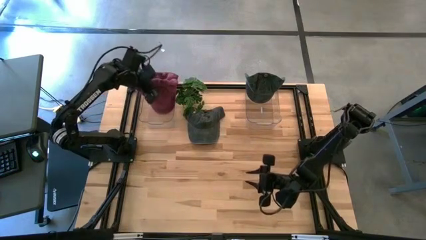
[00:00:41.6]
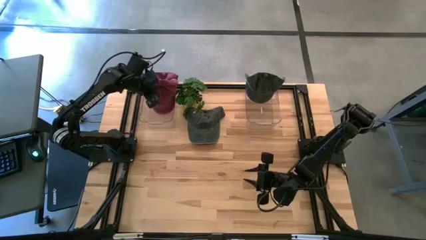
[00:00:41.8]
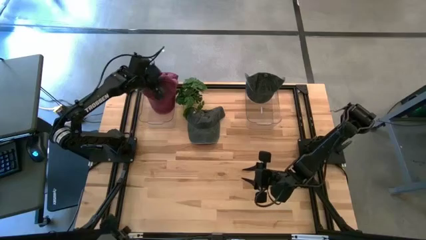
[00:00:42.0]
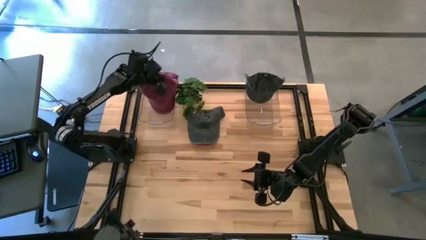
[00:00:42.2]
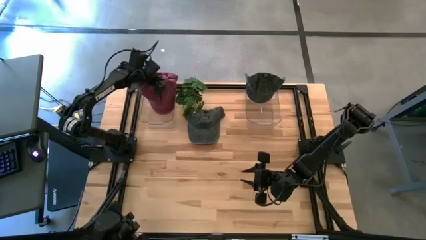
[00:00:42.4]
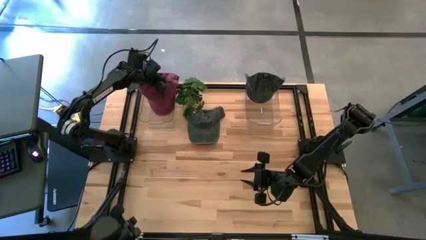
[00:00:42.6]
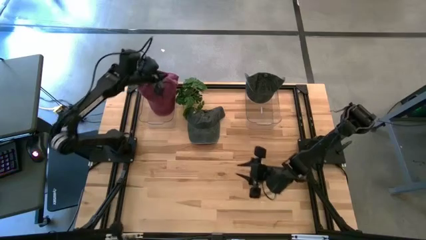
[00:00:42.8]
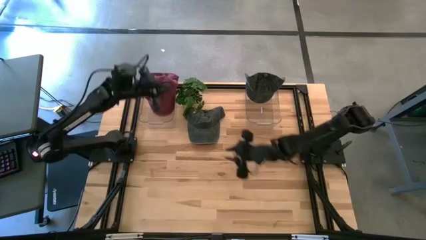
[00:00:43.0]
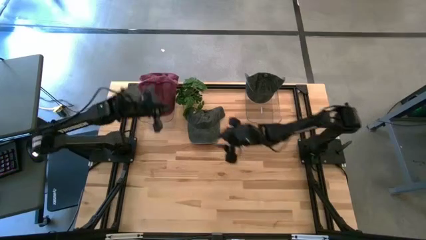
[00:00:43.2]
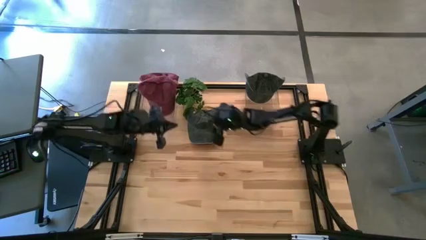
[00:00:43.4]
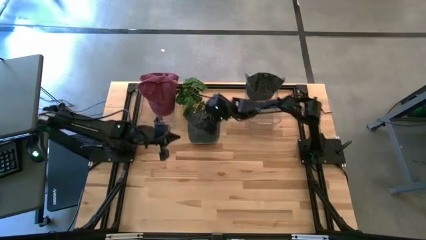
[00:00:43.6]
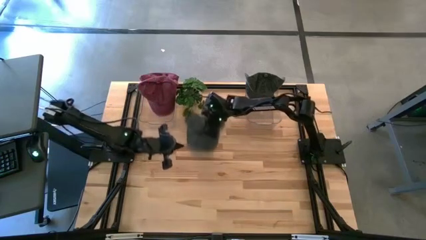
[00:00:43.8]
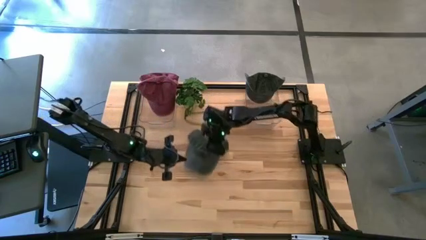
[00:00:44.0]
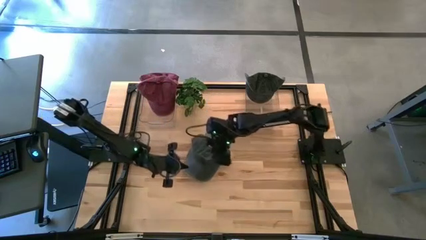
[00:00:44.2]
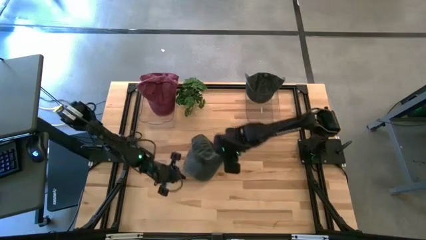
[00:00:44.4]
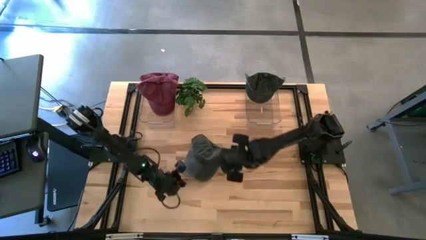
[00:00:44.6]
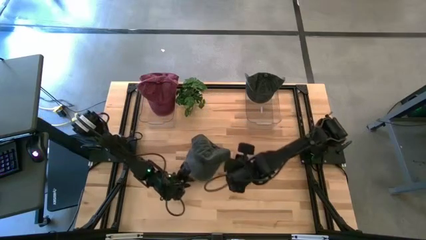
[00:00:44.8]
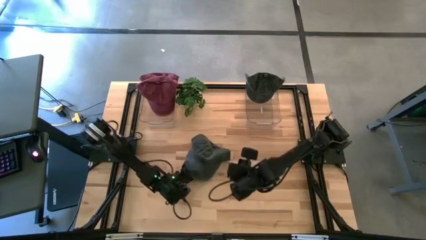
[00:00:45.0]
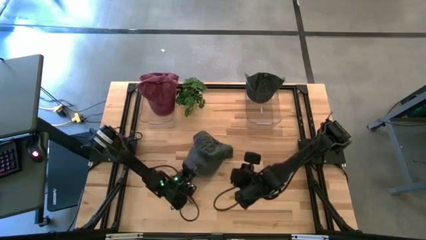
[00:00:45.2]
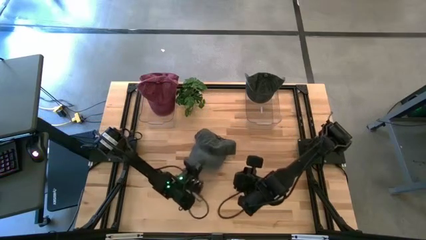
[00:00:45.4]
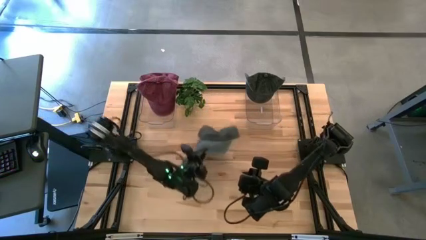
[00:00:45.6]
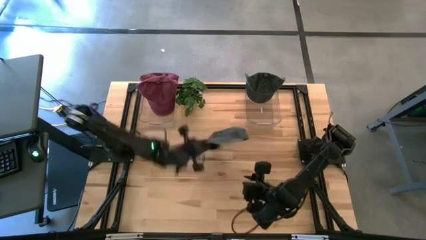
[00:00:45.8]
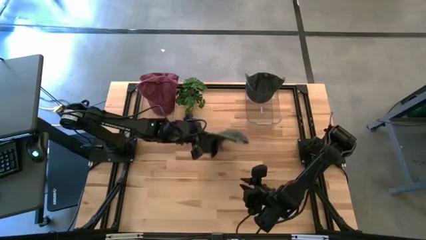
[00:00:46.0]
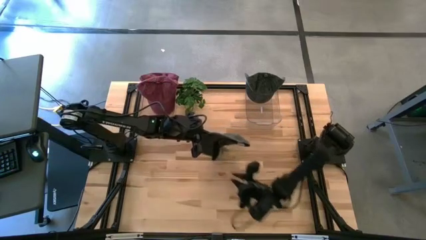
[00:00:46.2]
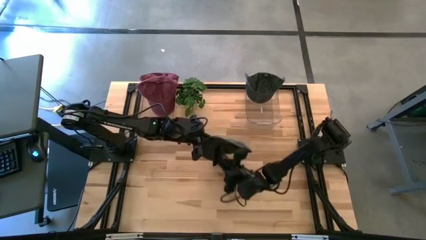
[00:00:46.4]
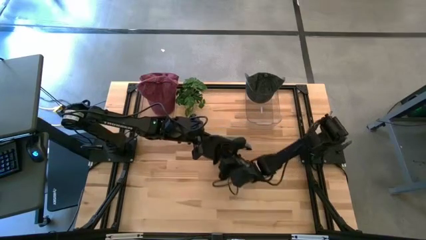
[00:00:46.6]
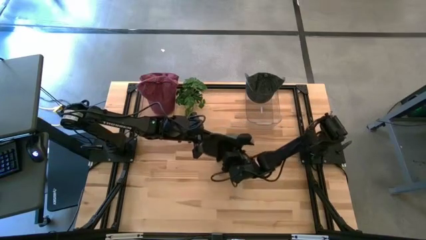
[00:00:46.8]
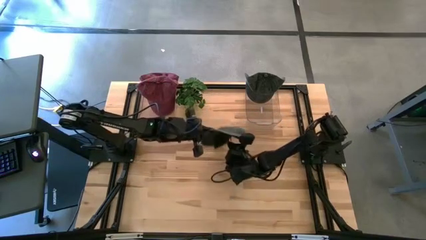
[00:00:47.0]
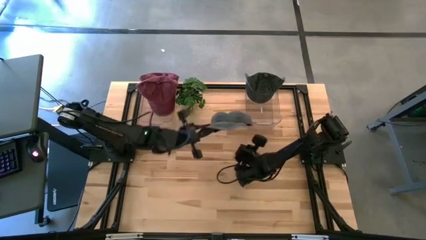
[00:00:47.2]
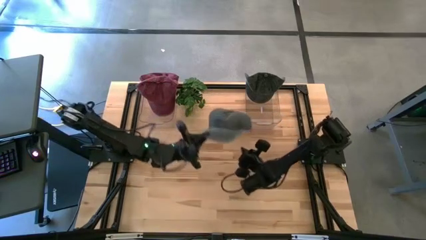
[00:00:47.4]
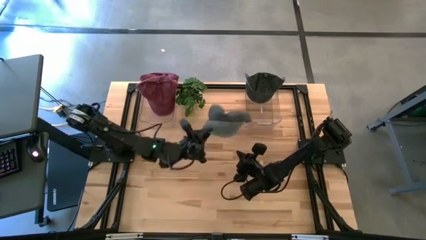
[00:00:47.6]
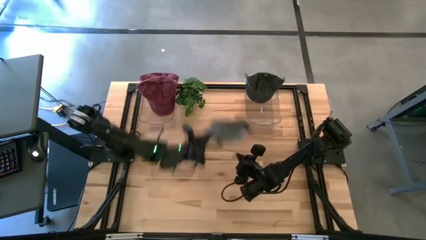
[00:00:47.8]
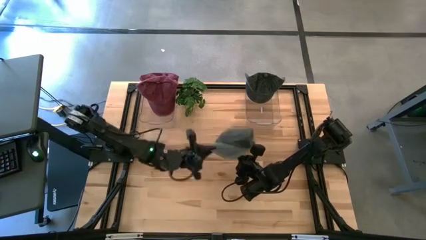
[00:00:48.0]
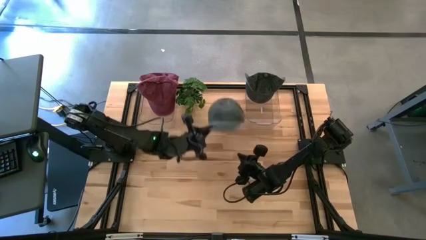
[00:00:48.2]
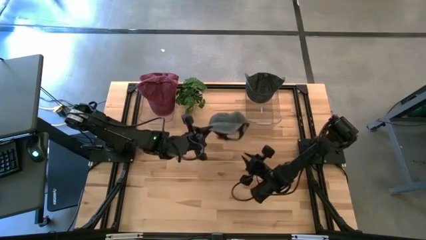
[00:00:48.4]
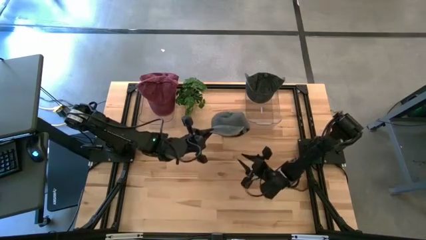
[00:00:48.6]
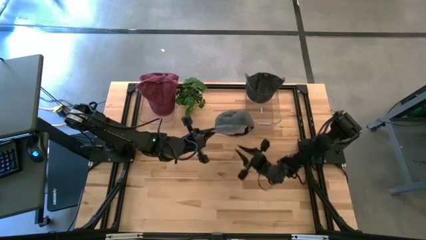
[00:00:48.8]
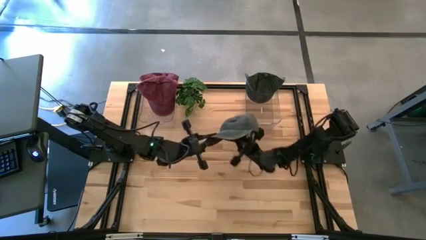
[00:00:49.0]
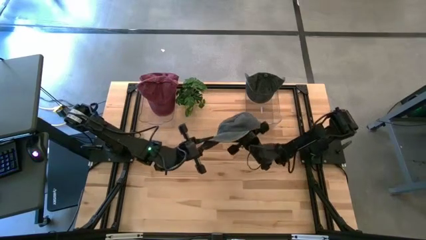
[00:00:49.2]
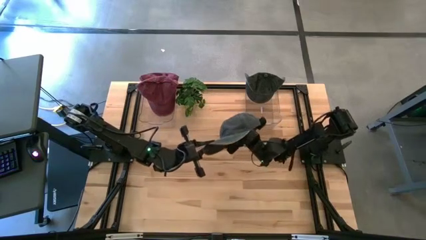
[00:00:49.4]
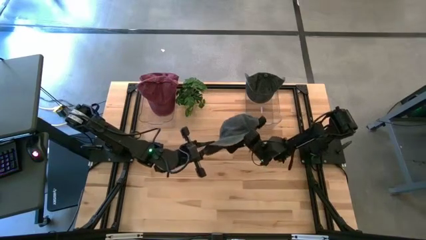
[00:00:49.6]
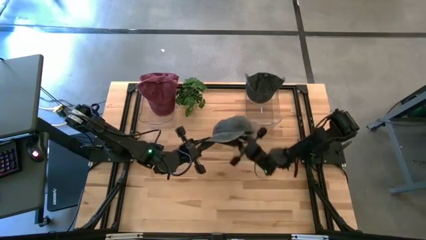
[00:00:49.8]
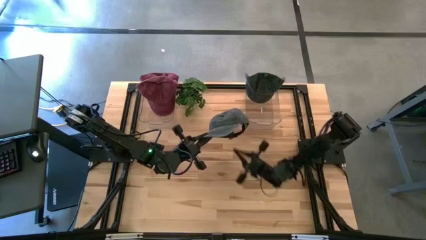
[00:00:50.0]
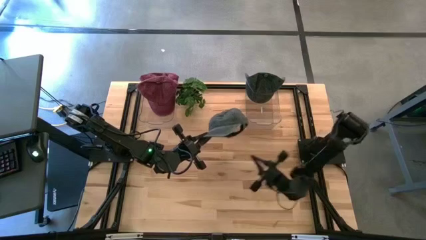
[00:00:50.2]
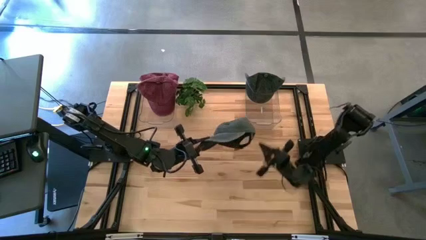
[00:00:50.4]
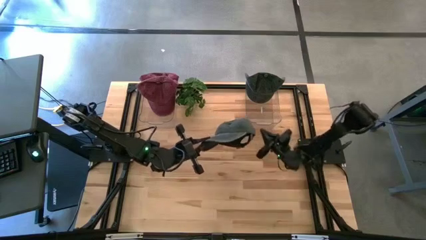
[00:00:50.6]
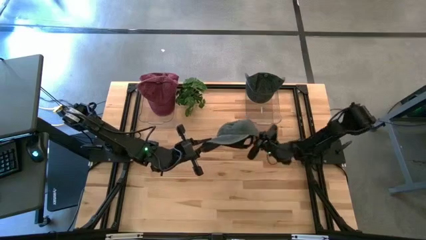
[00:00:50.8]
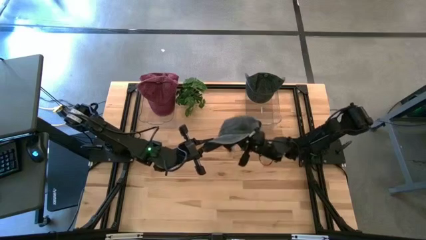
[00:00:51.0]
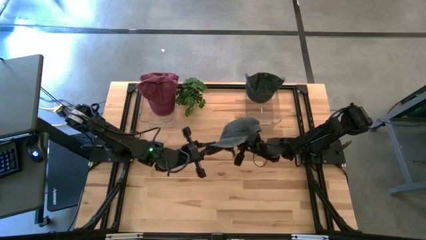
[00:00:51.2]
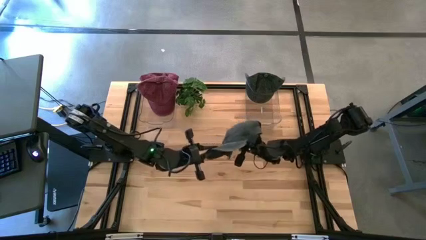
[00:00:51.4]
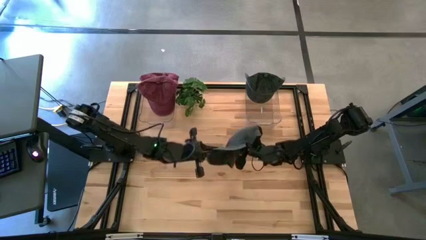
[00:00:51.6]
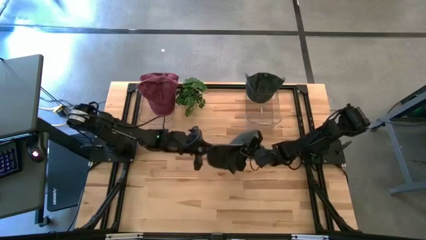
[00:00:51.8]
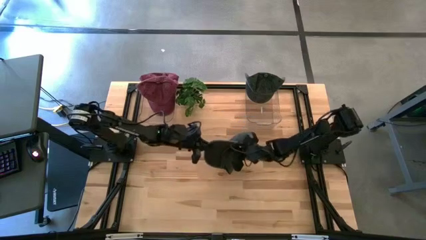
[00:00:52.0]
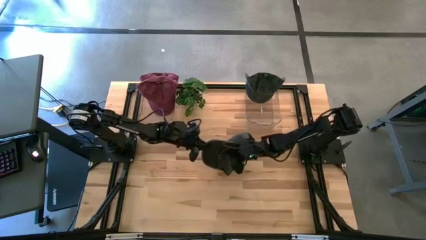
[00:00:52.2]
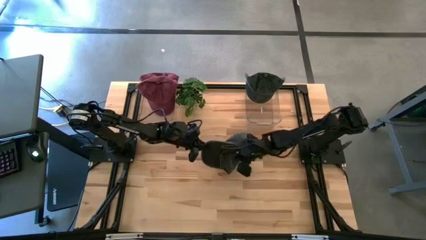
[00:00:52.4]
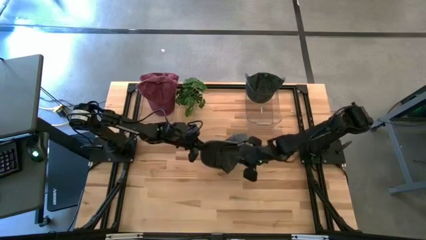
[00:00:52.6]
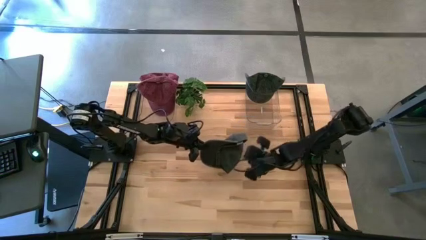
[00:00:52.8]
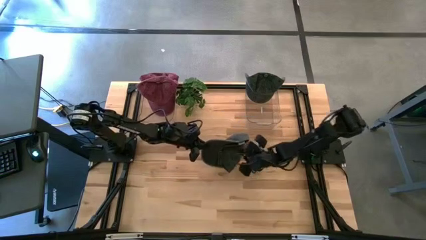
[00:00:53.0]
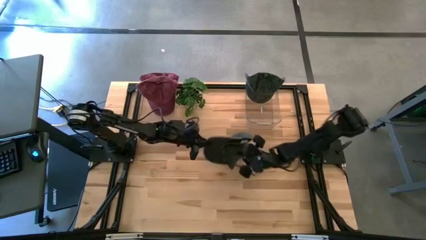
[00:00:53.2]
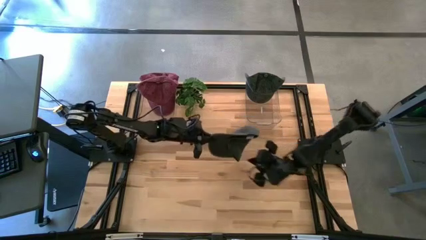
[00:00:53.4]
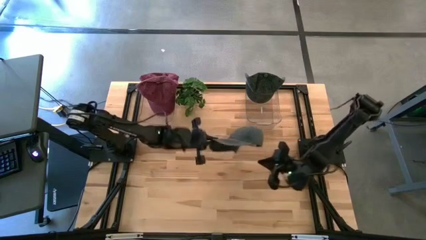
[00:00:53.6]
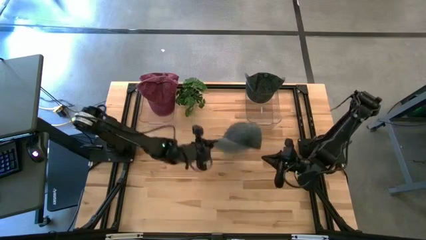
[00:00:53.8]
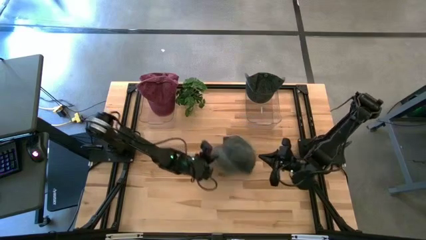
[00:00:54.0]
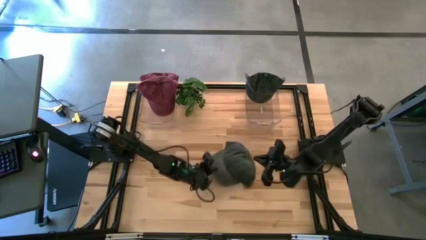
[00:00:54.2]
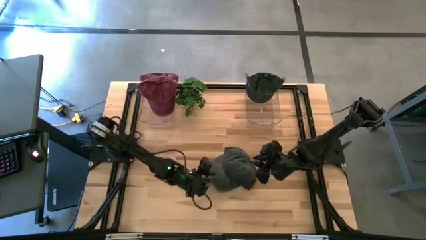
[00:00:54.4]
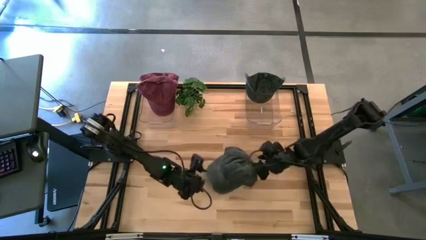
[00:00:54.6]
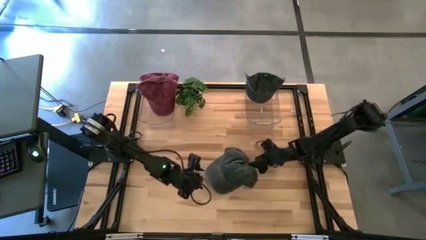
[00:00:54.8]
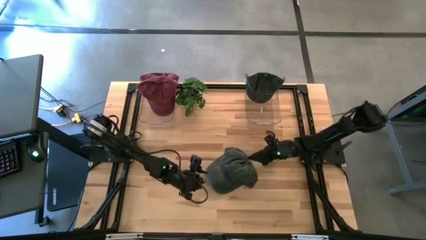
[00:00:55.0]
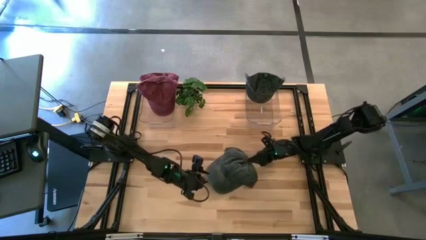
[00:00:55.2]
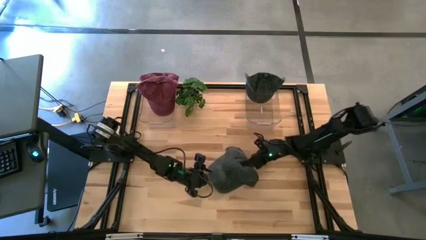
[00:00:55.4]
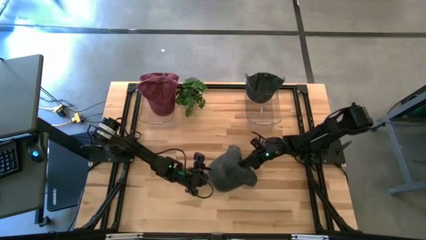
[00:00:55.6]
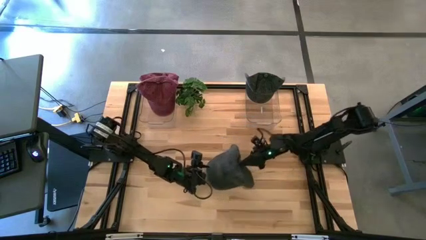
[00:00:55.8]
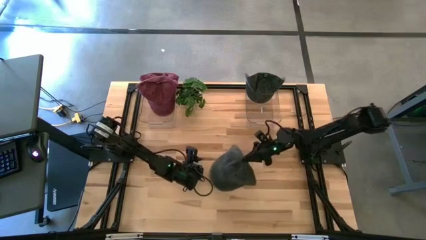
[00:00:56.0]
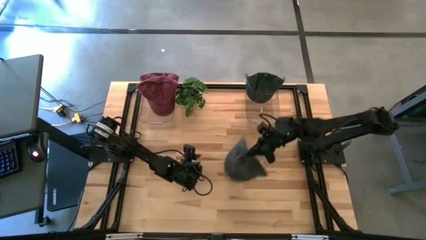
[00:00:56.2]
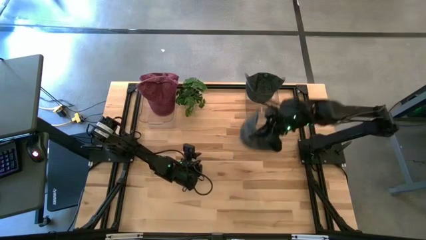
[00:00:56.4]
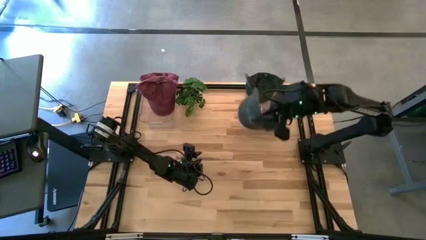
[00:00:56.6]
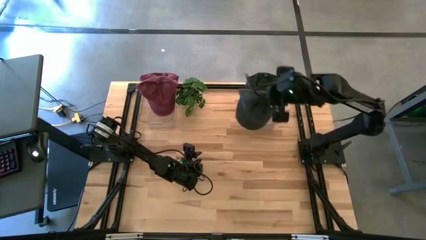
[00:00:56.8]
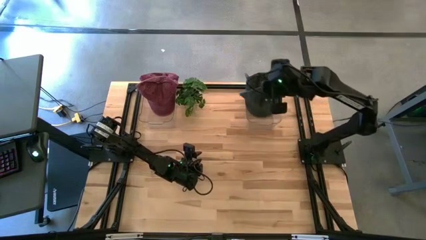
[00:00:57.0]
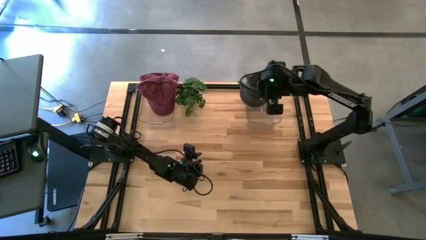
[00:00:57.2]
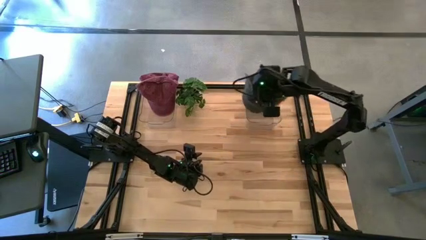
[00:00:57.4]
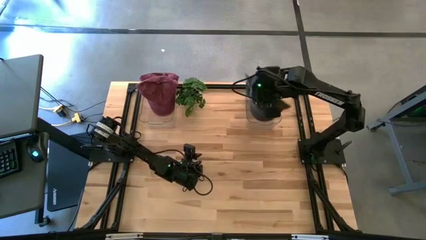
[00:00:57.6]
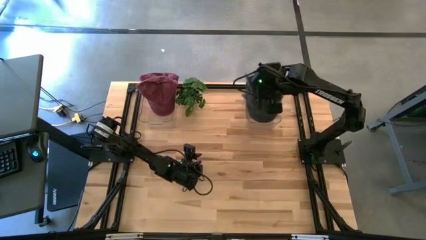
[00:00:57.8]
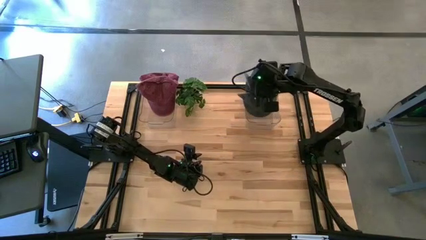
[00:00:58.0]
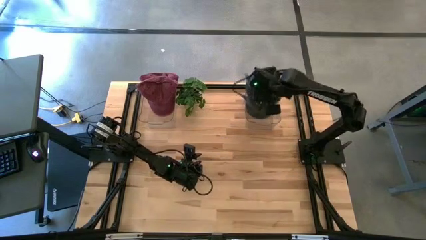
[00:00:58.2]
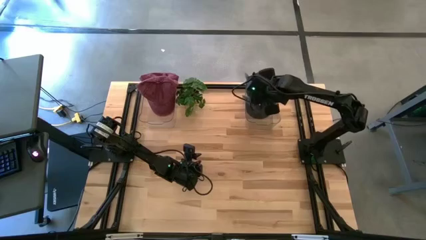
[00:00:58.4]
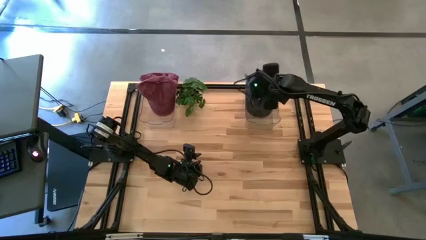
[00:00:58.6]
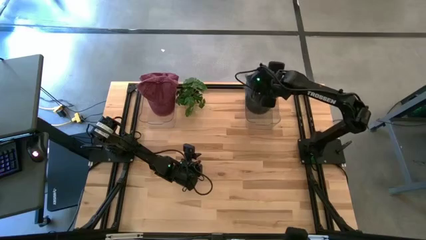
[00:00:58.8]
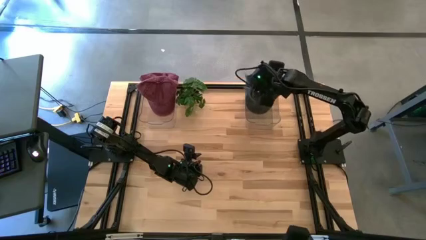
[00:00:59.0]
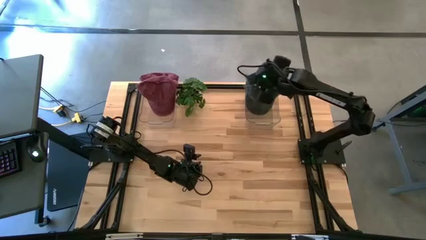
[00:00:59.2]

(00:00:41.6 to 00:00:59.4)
Task: Pick & Place hat
Put the gray cap into the right transparent bin
